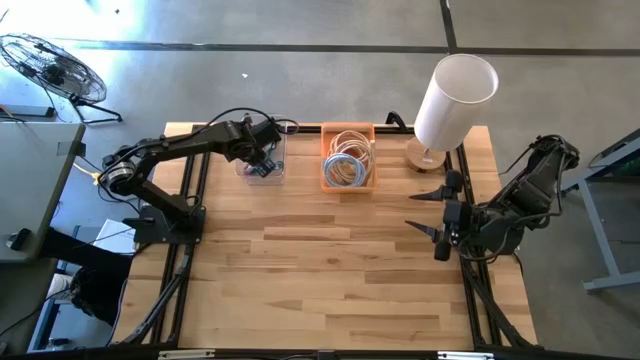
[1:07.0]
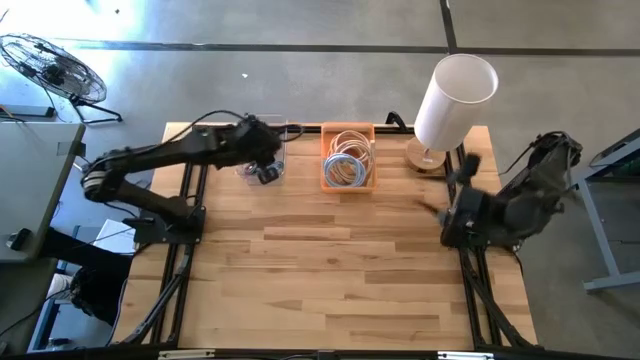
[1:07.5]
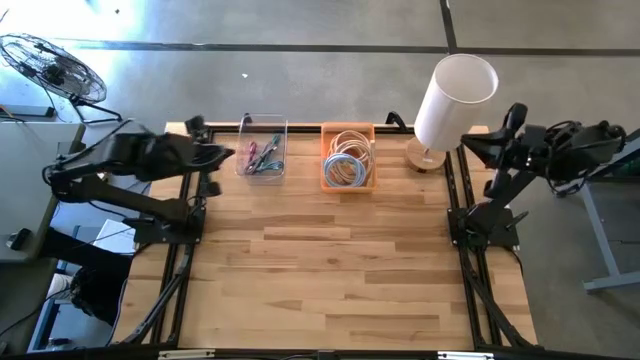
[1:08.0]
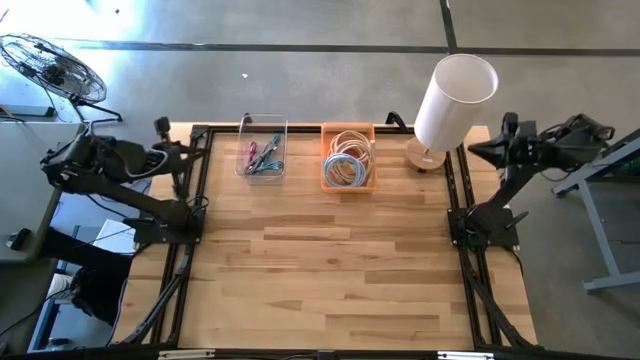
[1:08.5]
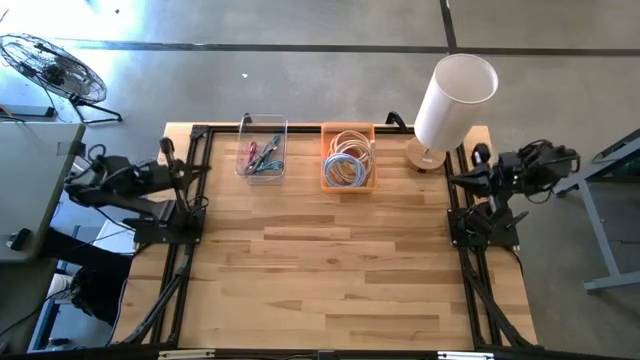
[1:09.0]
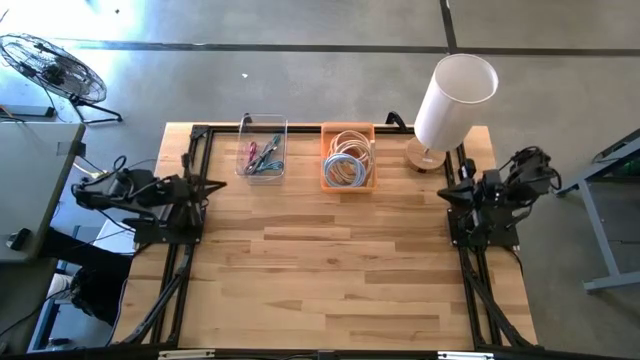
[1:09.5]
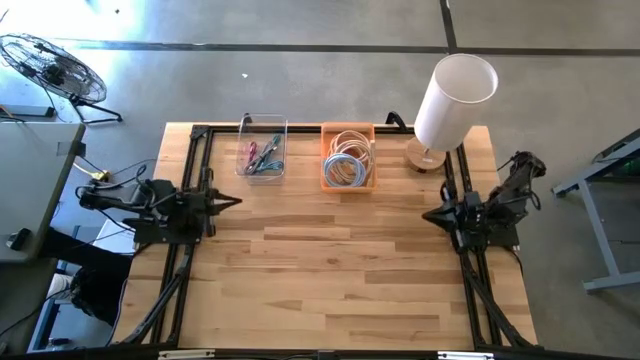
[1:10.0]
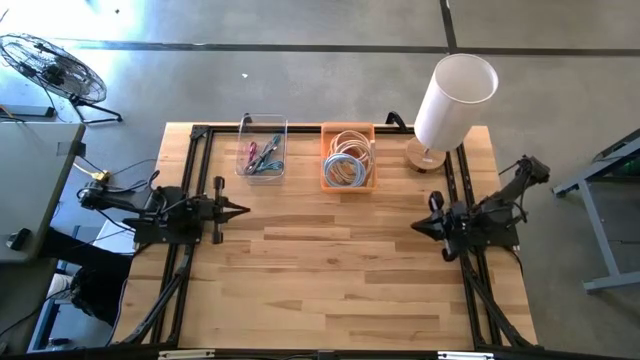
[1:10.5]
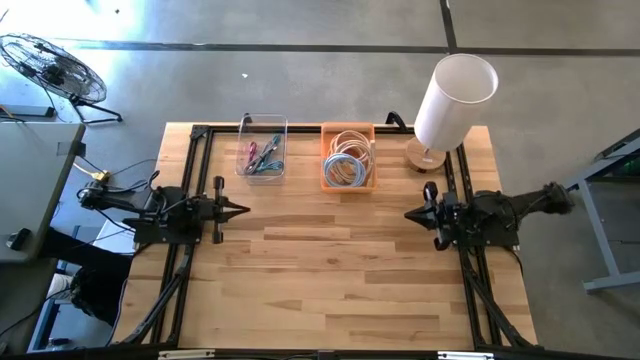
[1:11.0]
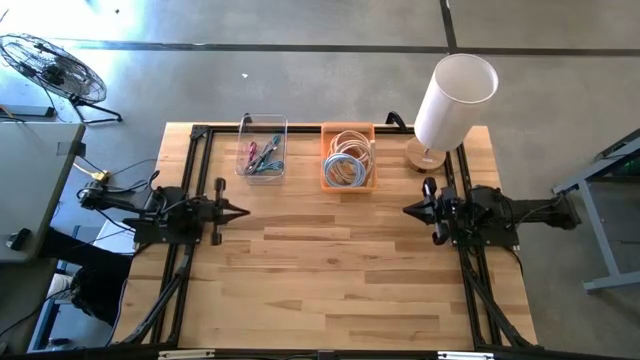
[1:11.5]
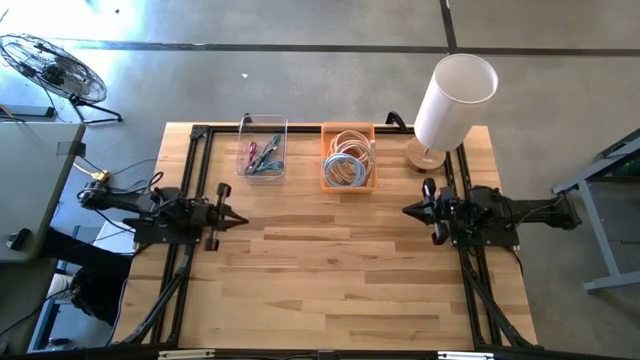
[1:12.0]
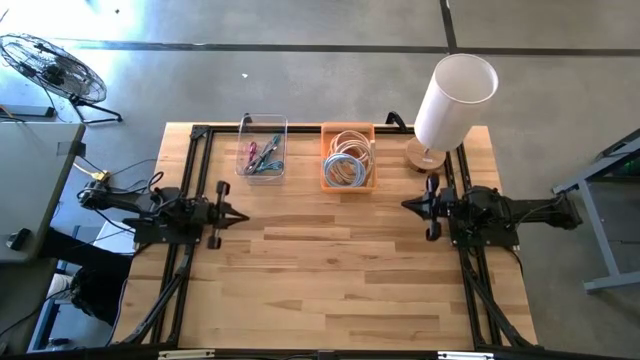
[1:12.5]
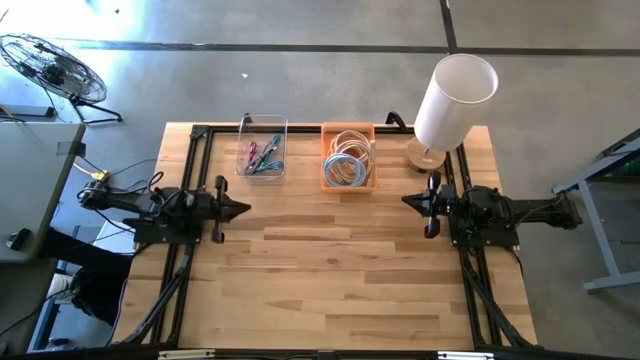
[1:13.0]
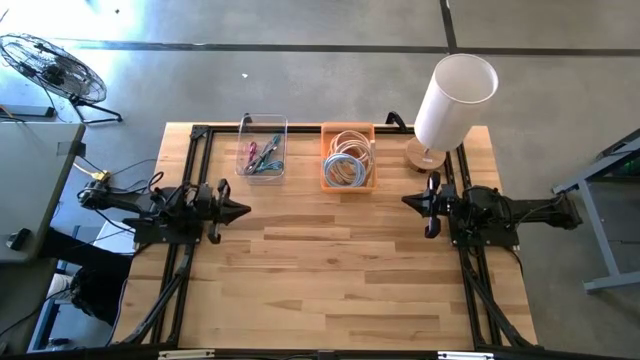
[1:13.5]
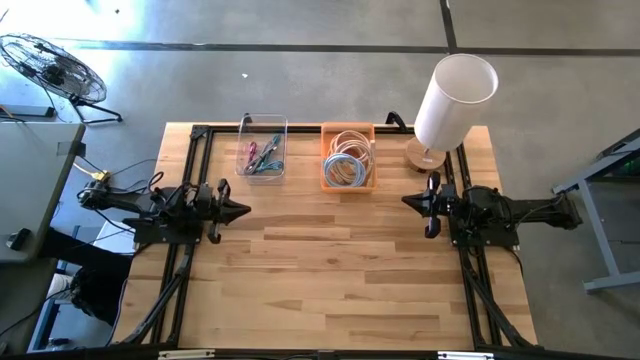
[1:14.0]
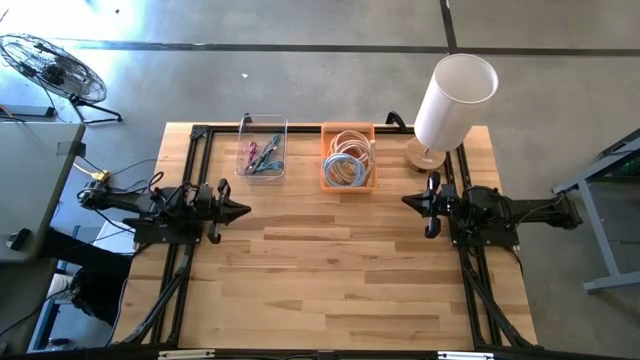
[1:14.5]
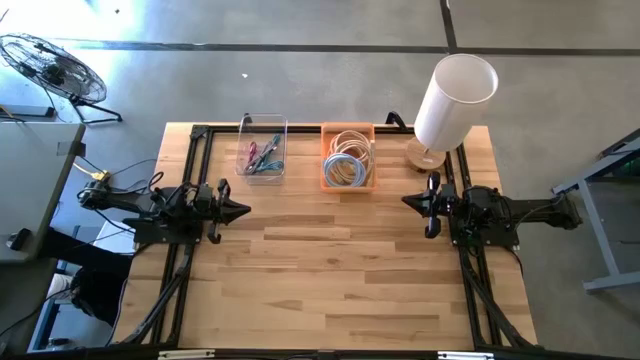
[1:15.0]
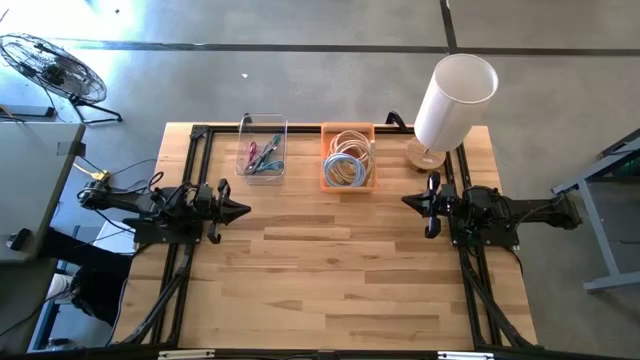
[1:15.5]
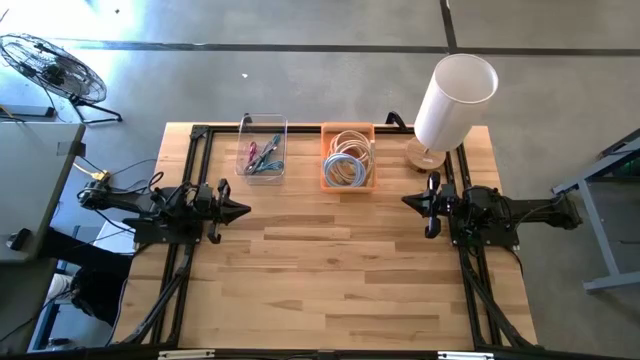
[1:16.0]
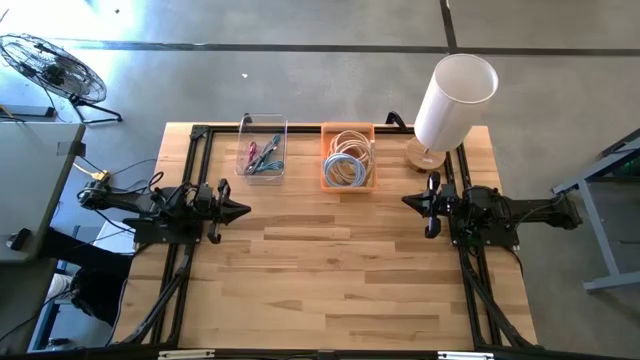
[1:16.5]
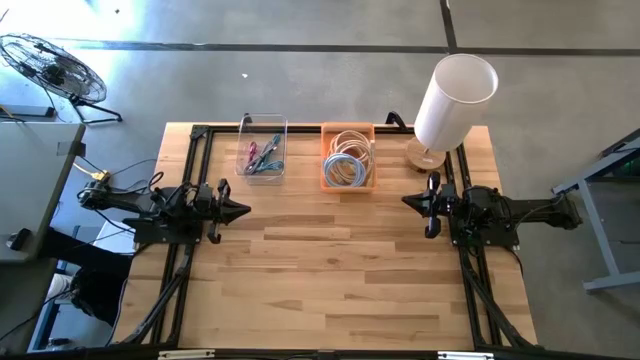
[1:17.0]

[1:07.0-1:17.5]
Task: Pick & Place USB Port
Return to Home Position

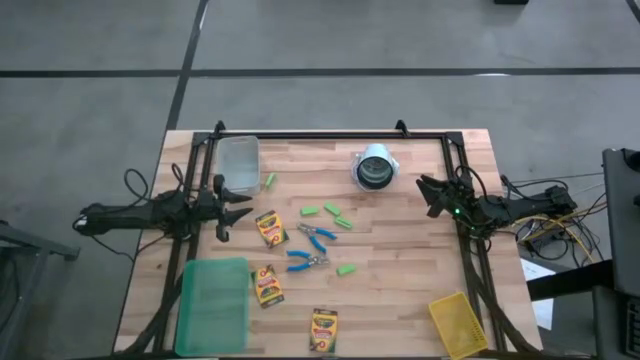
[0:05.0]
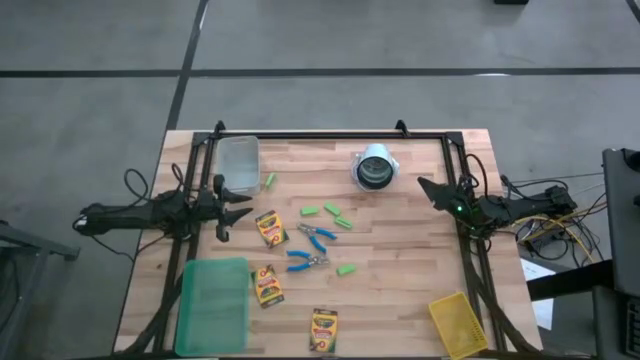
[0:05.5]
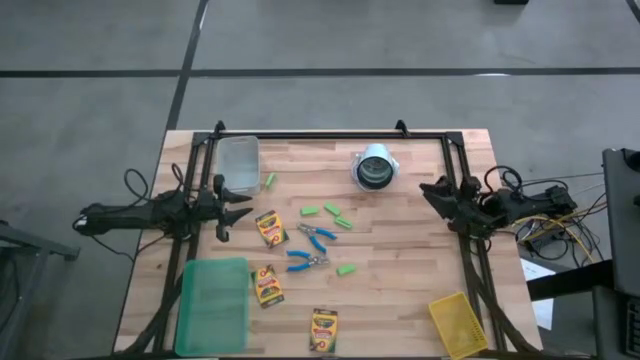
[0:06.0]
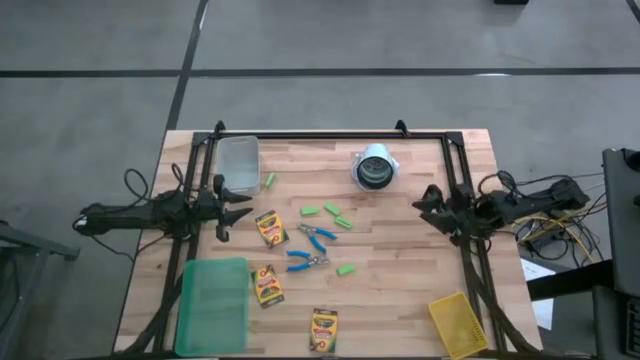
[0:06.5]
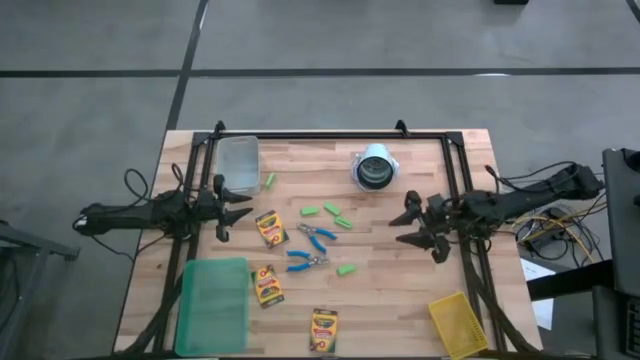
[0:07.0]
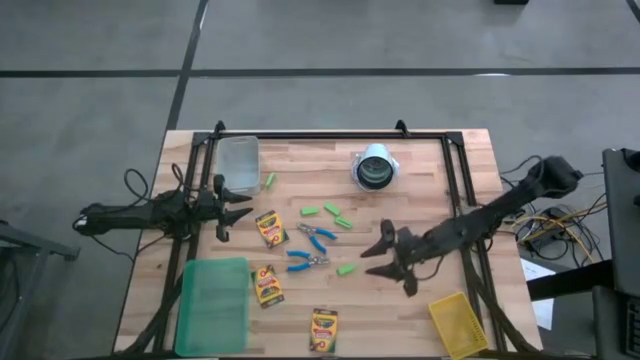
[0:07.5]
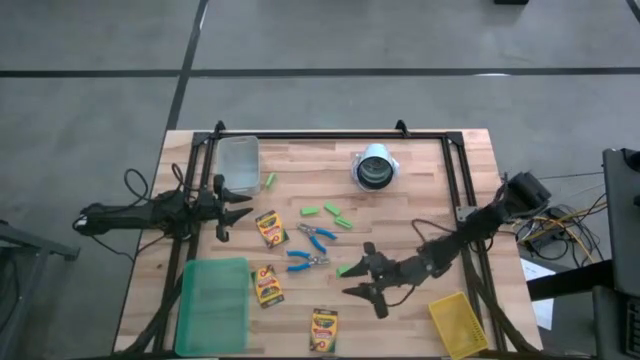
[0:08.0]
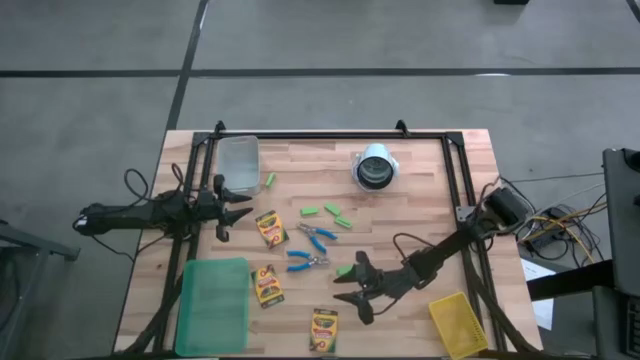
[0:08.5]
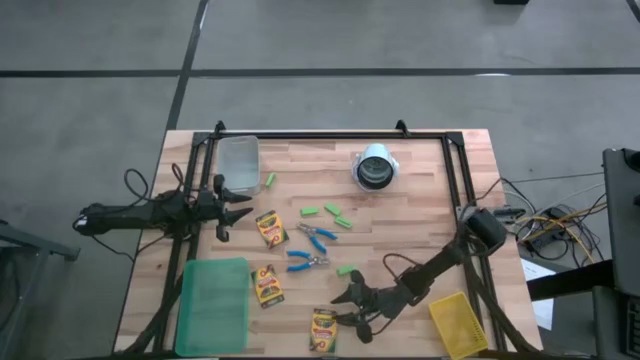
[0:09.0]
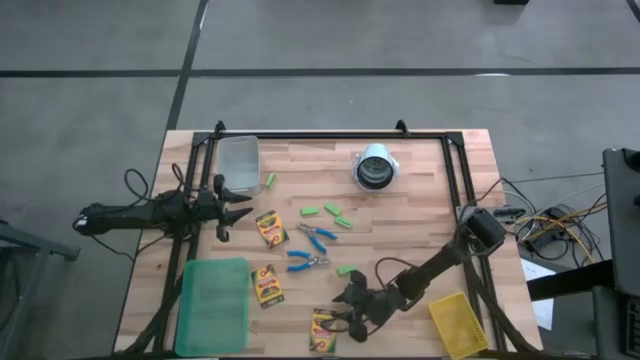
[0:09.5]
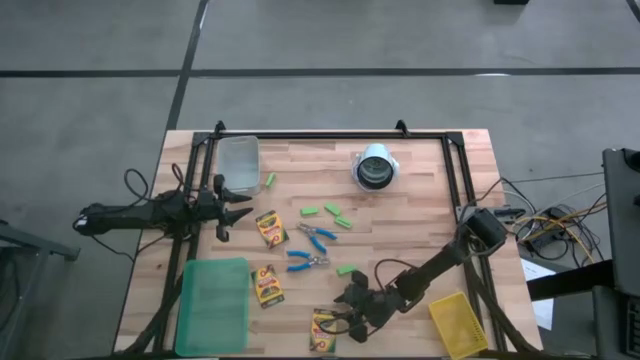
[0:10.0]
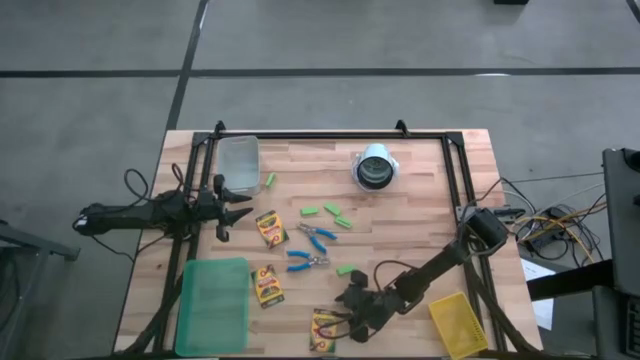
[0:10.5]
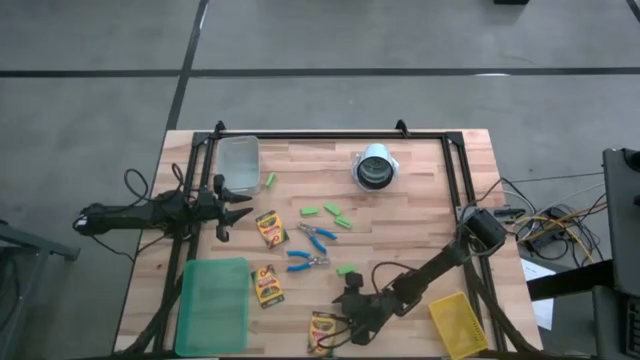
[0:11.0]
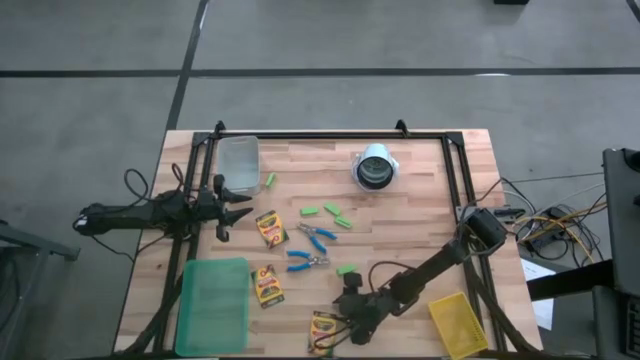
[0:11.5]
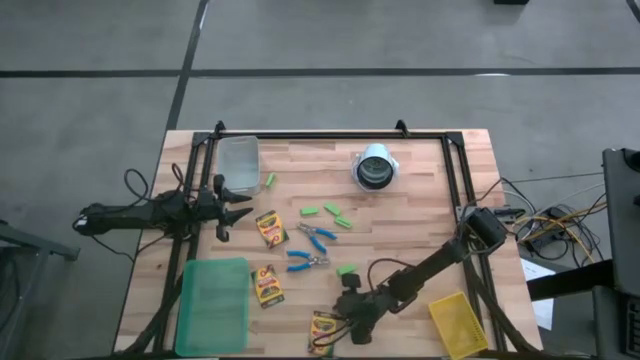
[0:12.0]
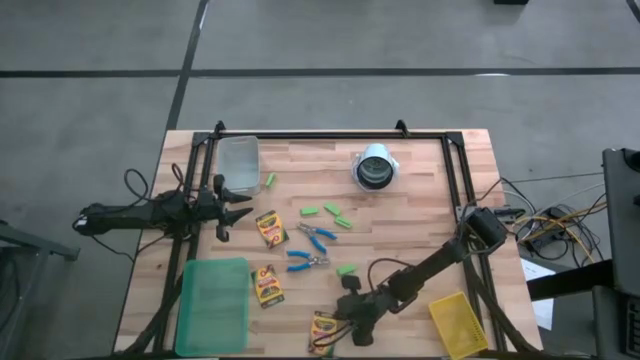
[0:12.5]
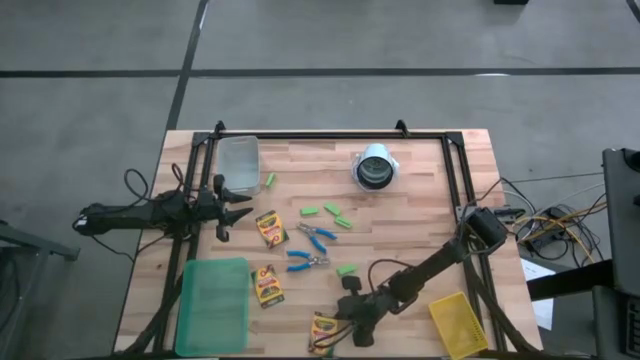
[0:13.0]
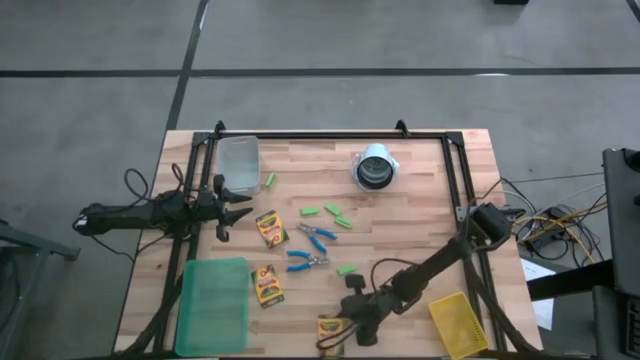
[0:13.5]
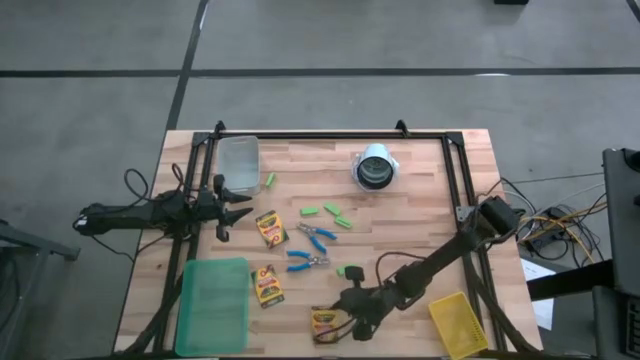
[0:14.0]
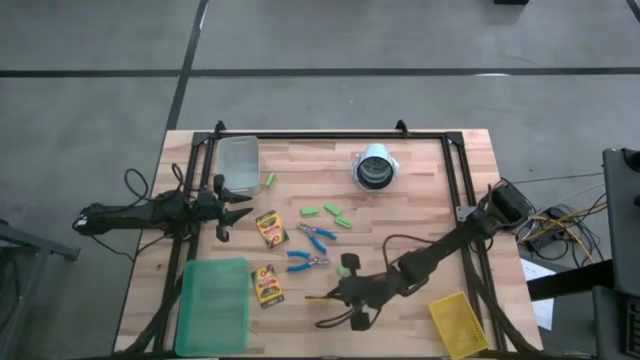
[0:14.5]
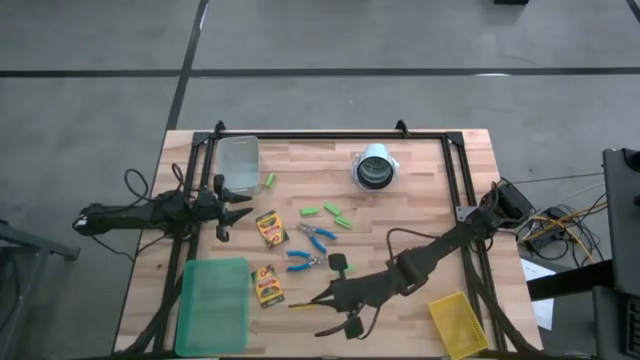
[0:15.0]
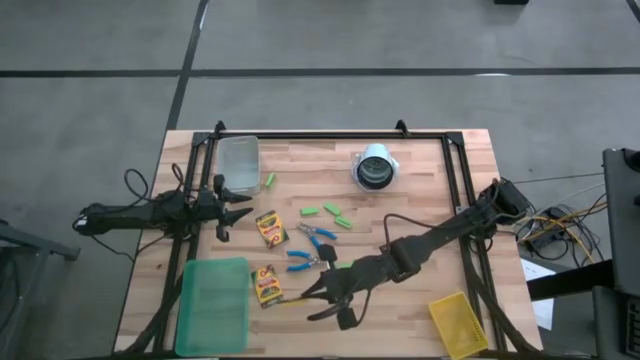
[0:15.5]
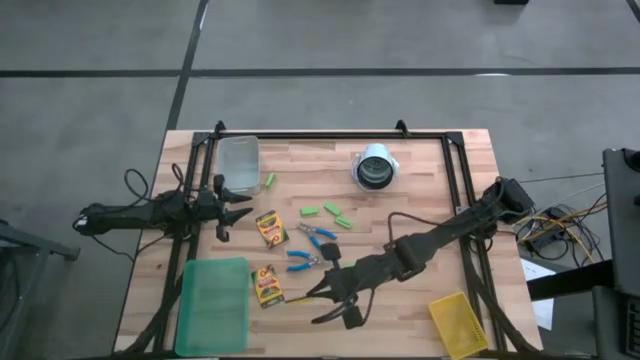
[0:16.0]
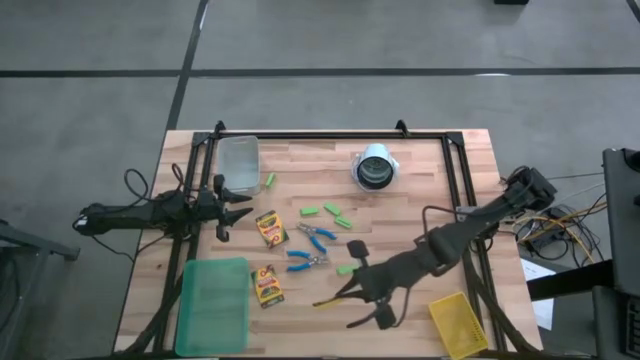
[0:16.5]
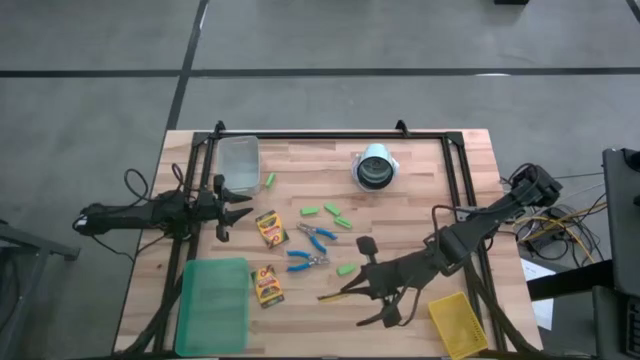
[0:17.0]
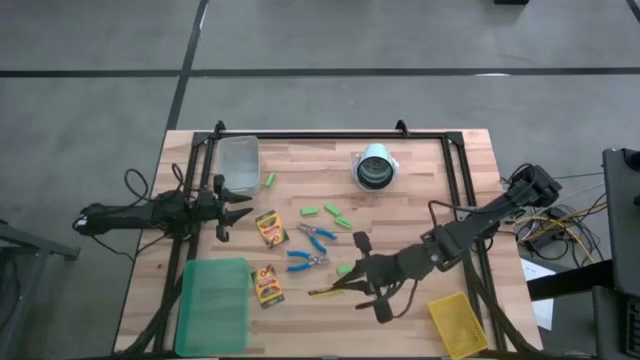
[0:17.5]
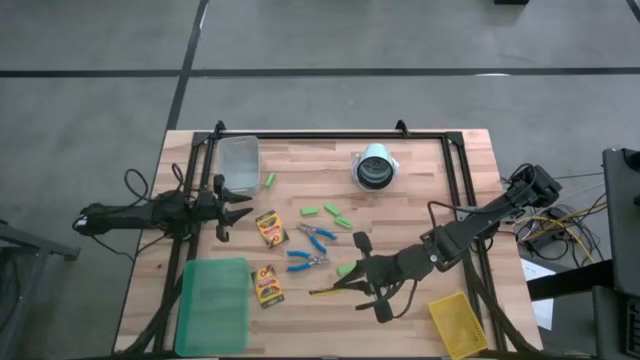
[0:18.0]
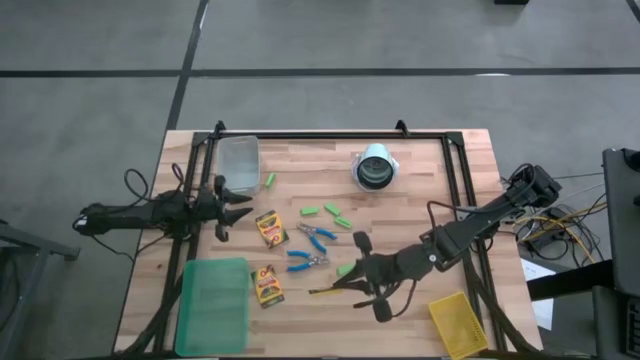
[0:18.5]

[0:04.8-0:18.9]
Task: Pick & Place School Supplies
Put the yellow crayon box into the green bin
